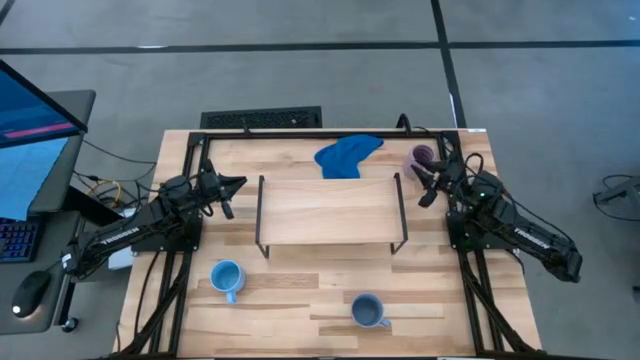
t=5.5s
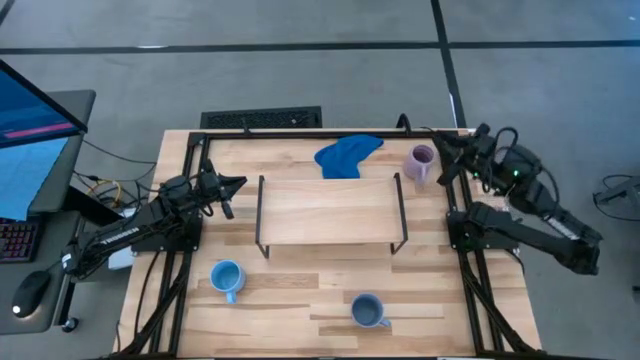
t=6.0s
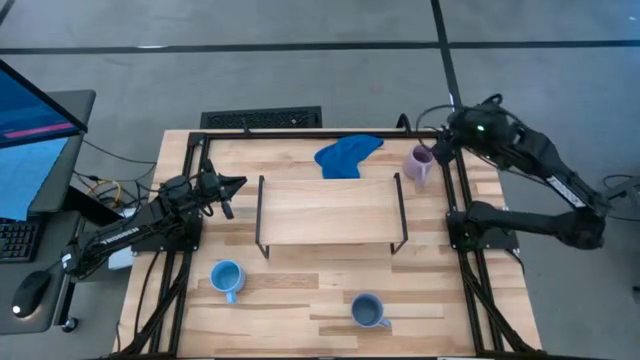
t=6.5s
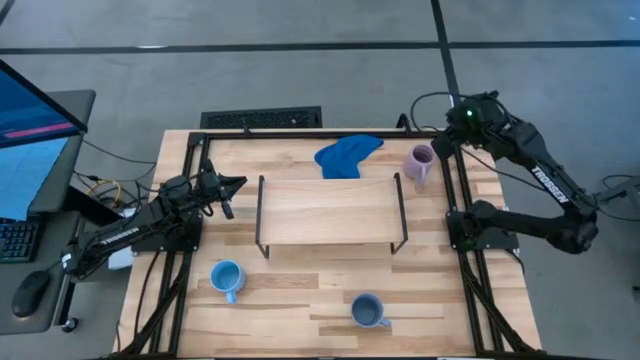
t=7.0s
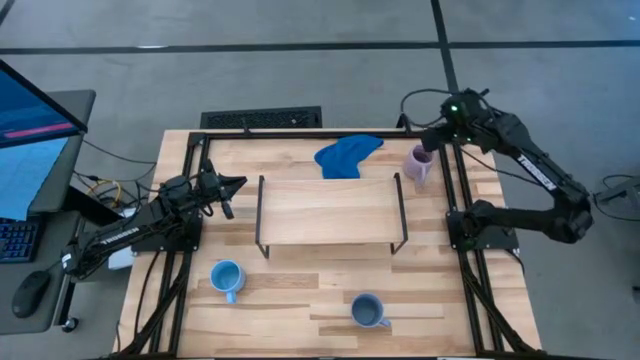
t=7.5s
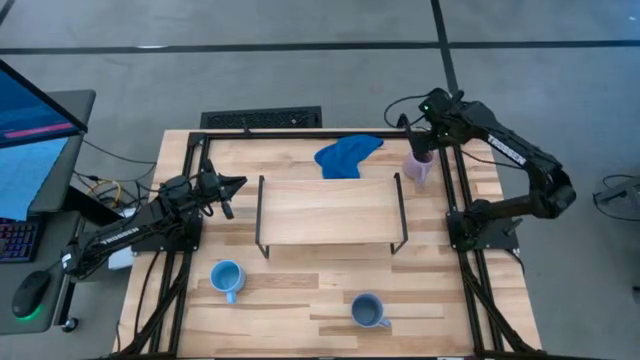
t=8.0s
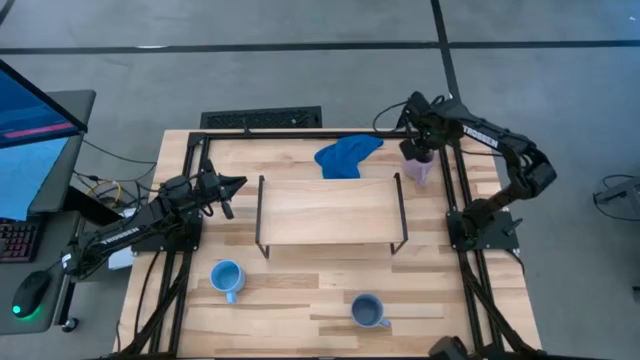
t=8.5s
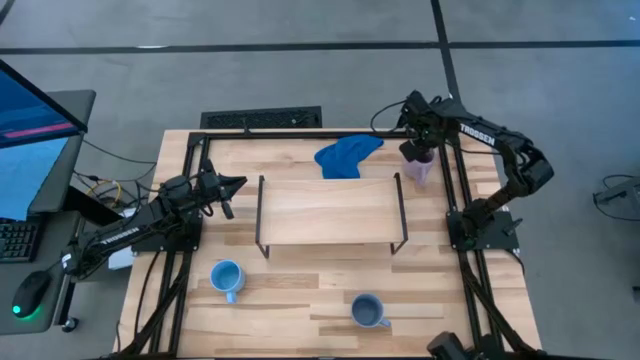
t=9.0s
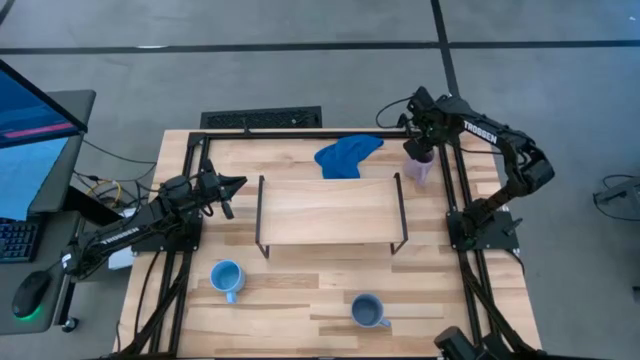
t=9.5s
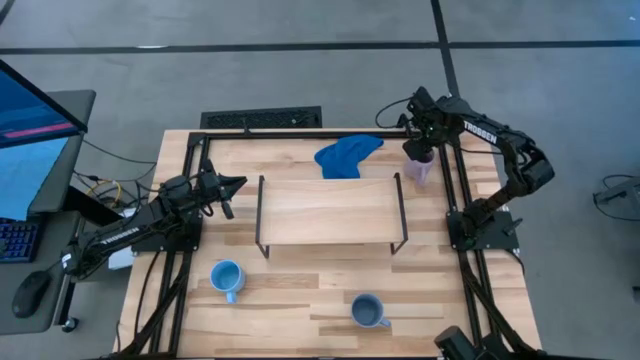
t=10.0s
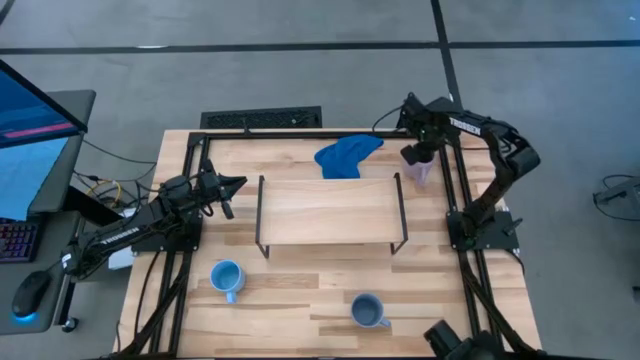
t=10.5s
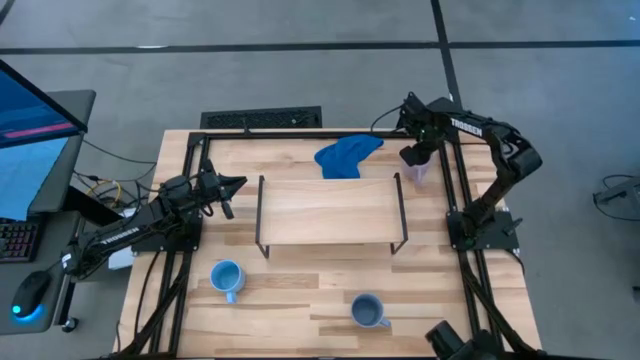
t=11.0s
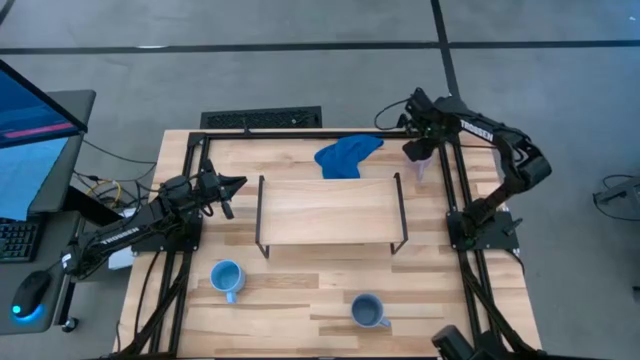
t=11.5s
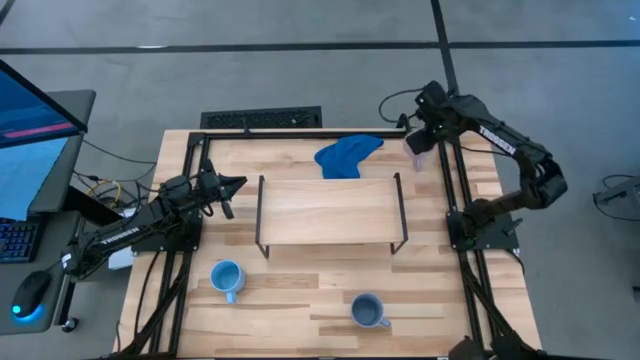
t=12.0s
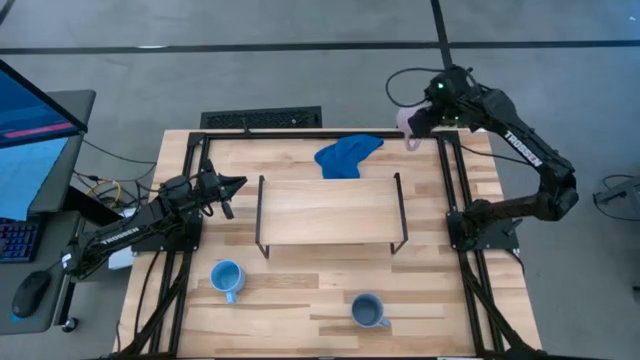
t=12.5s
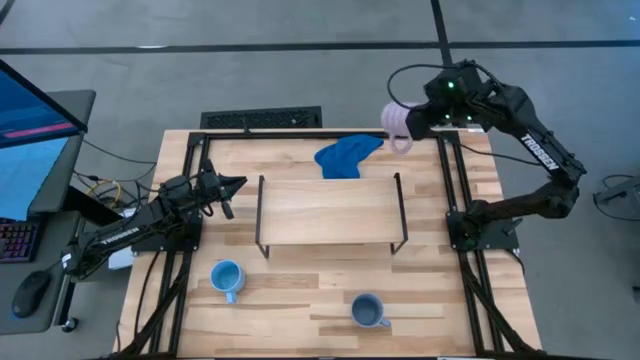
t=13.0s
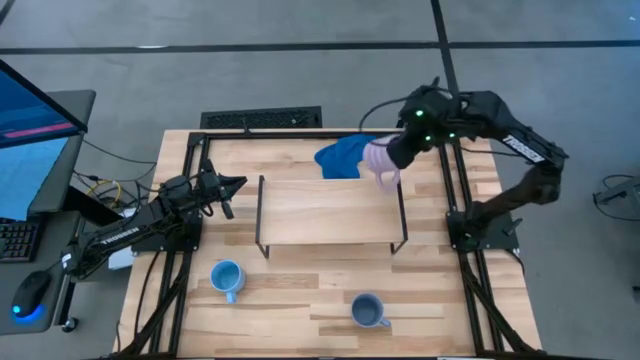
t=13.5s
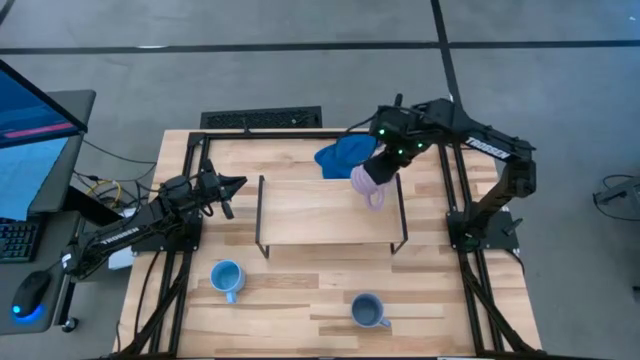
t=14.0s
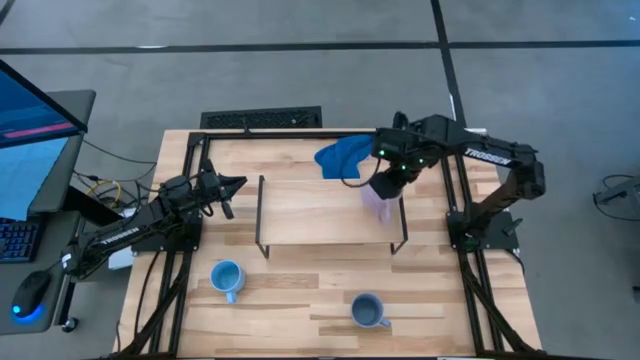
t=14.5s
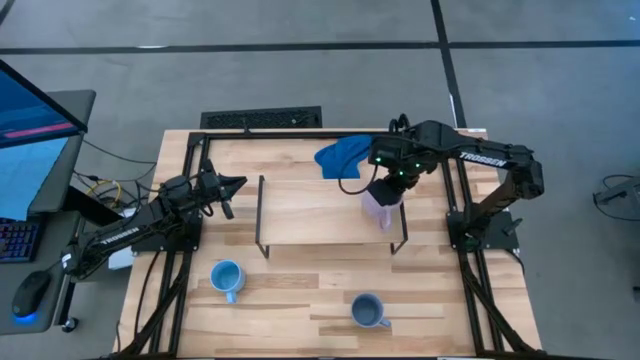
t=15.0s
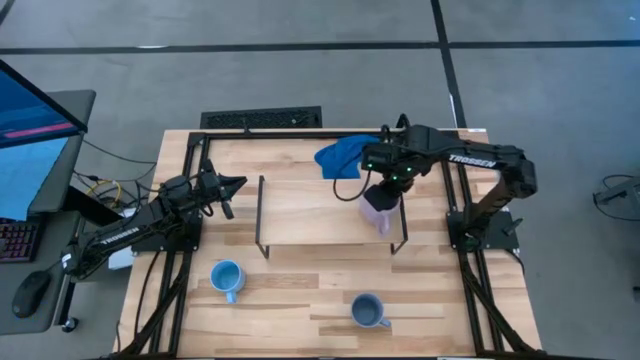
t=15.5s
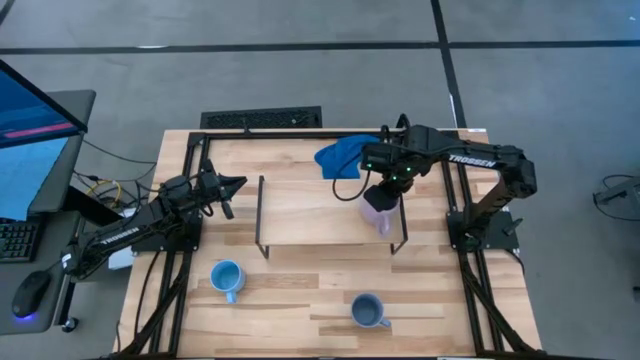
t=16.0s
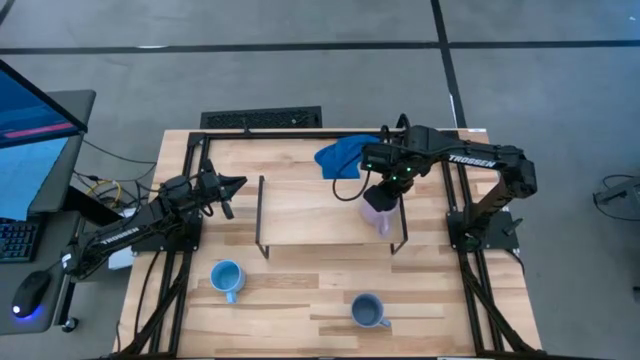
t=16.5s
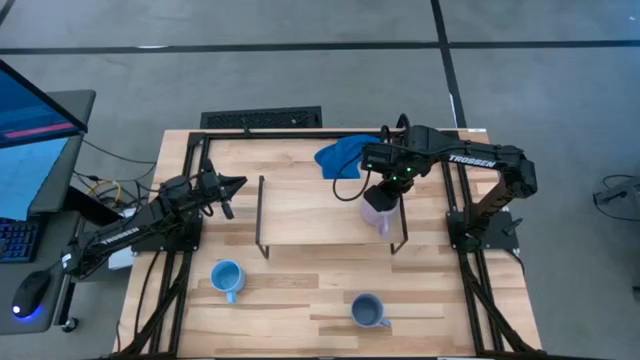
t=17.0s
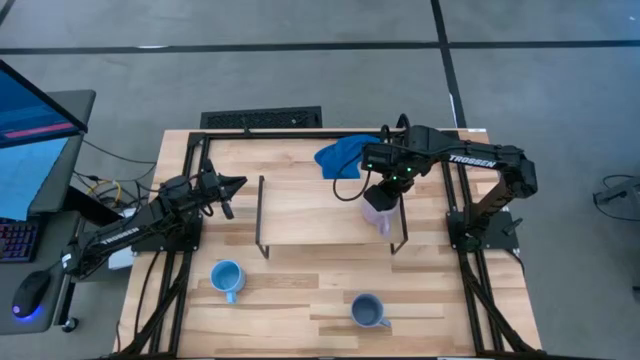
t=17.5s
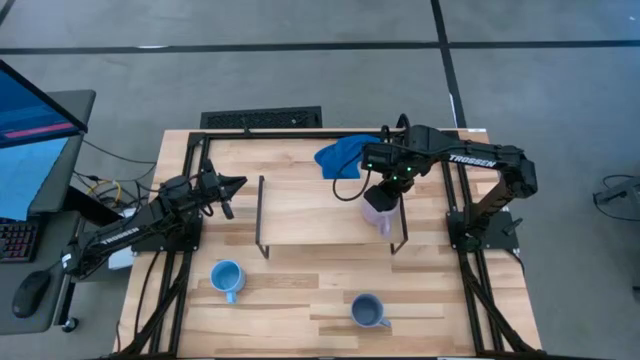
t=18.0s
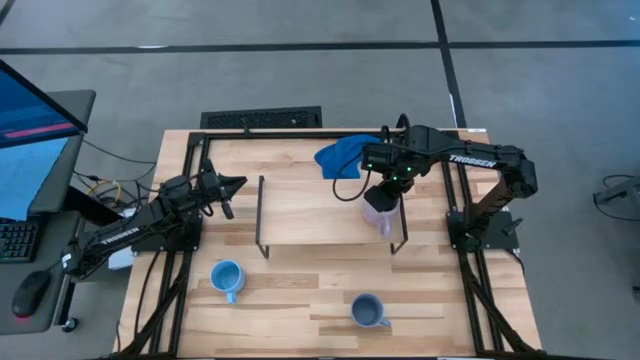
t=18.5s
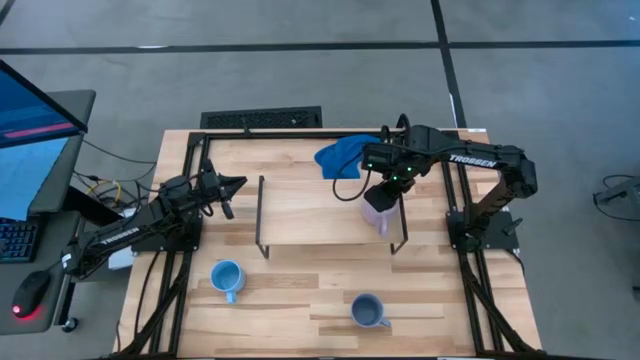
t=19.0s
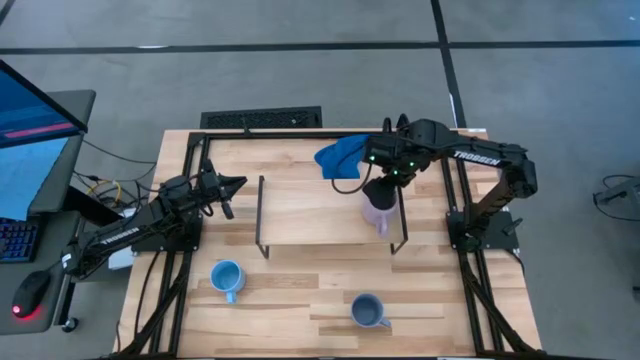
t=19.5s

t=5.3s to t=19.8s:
Task: Stack small to large cups/mugs on shelf
Put the violet mug on the shelf

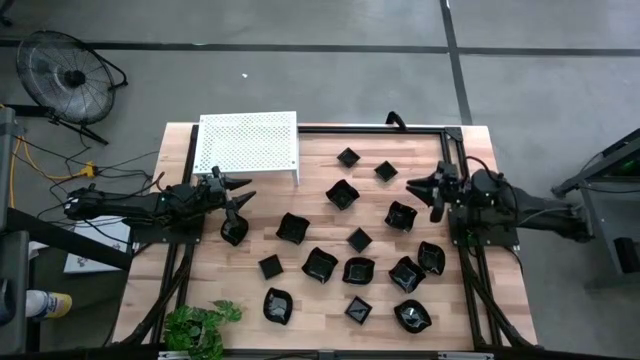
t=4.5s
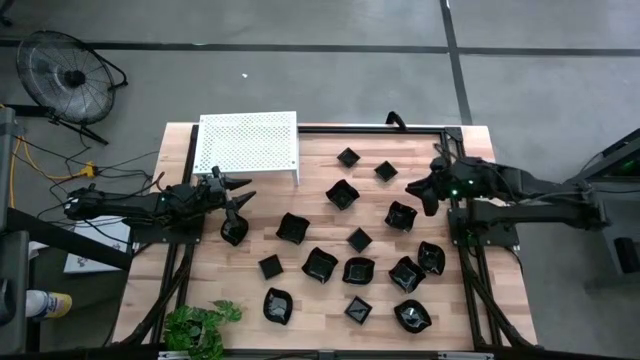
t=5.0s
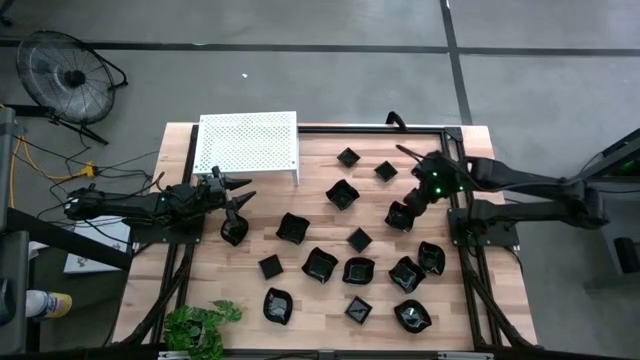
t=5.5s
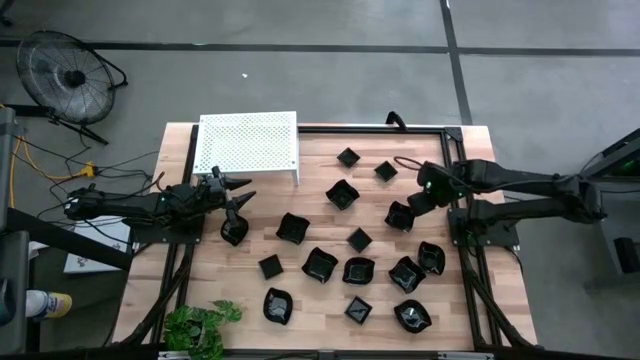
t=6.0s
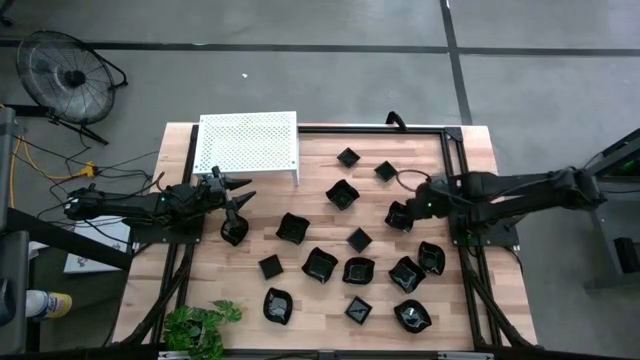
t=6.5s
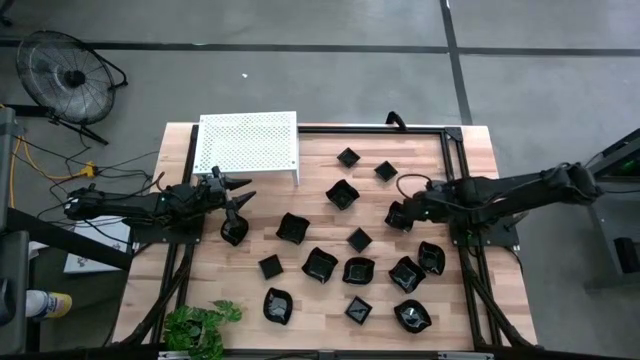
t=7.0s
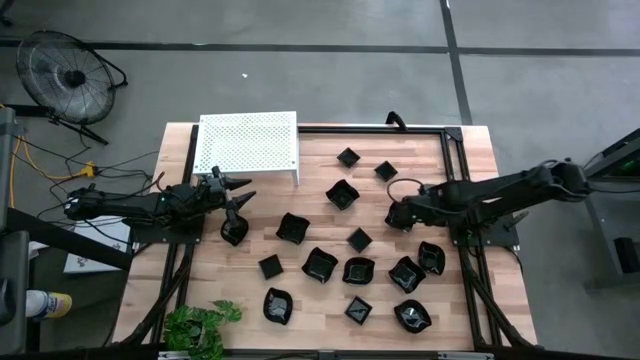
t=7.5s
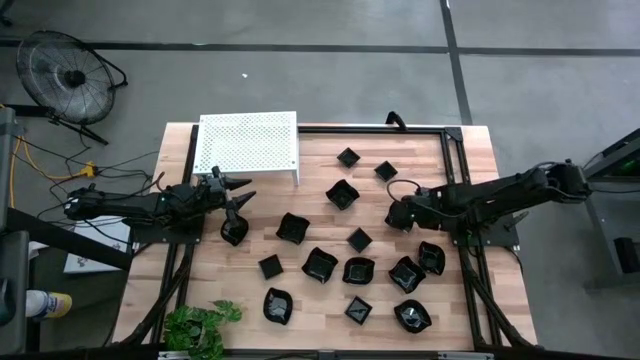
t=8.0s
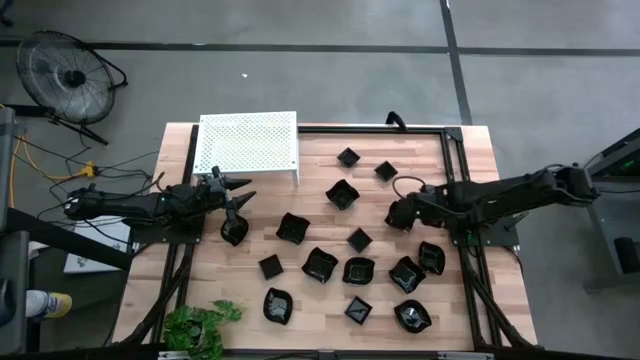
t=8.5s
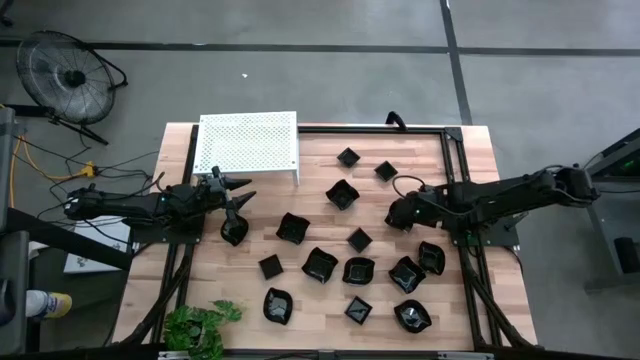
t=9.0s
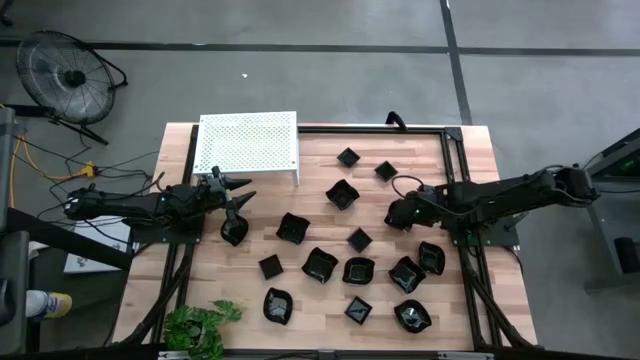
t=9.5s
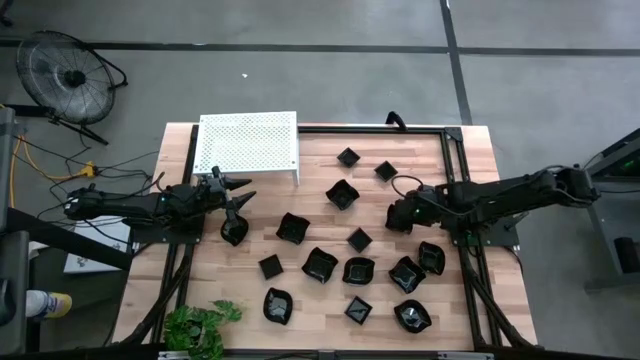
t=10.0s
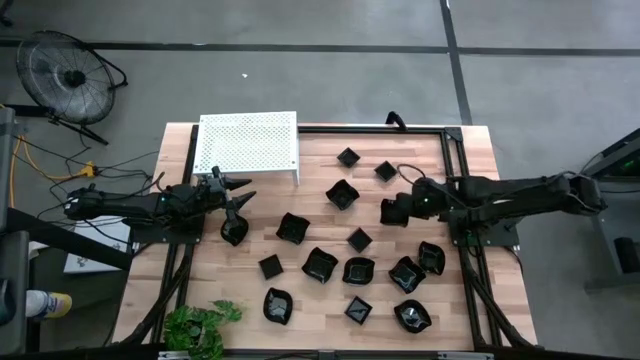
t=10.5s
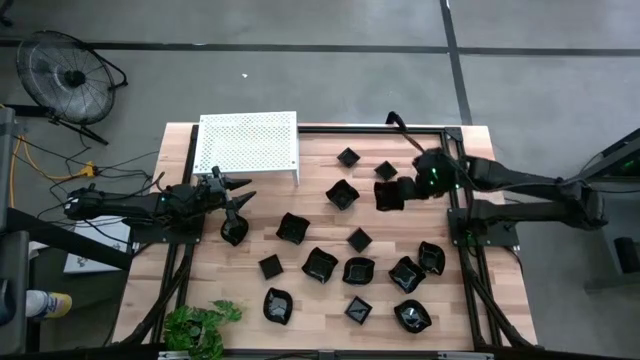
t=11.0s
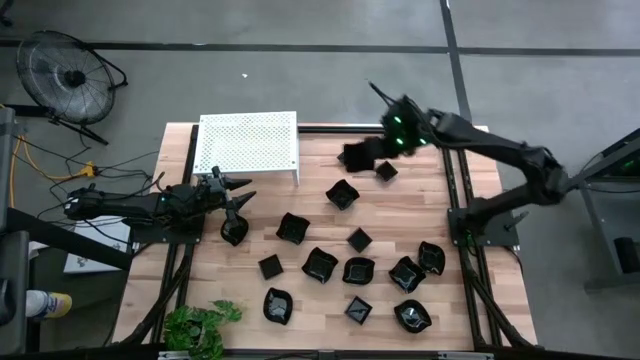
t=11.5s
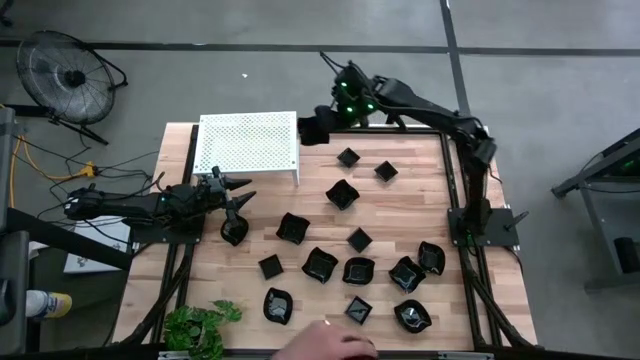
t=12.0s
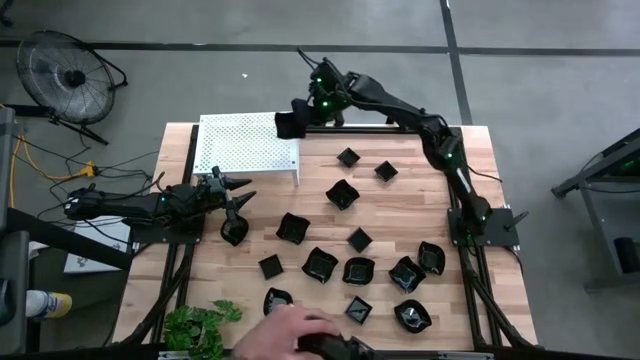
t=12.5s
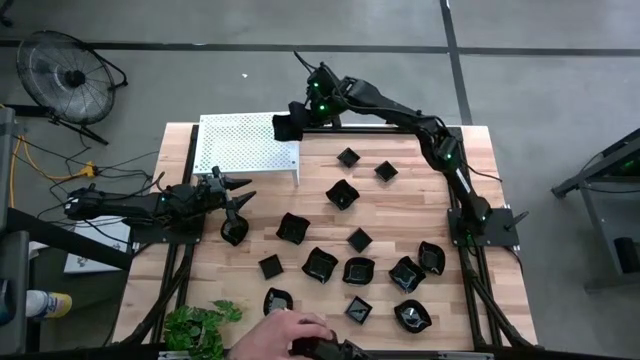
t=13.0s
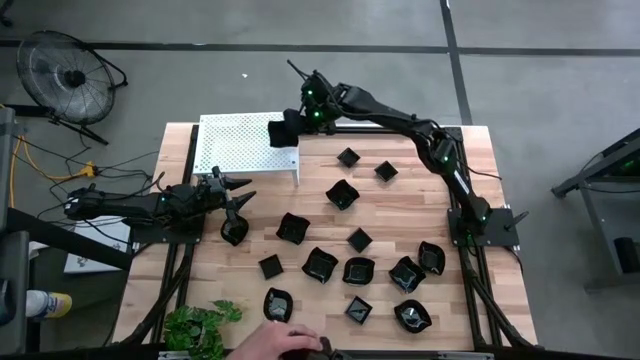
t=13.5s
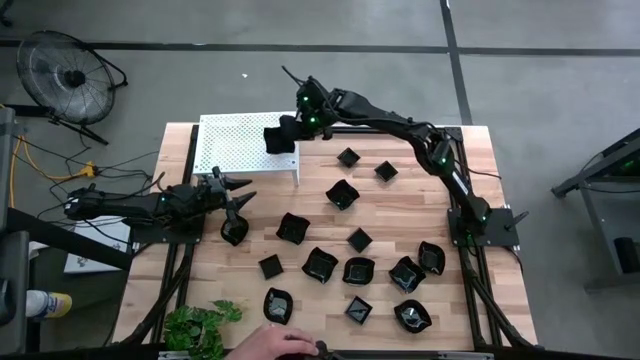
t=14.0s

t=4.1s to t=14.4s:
Task: Pick & Place Mini shaped plates
Put the black distorted square plate on the shelf
